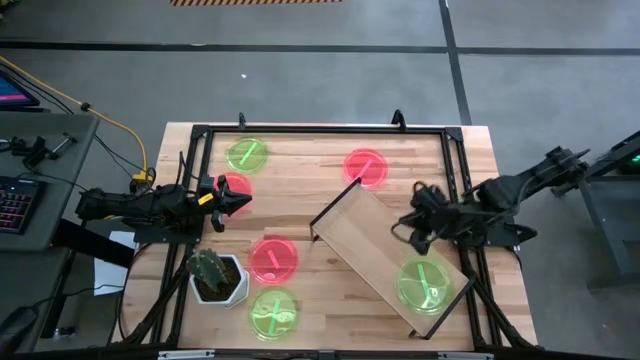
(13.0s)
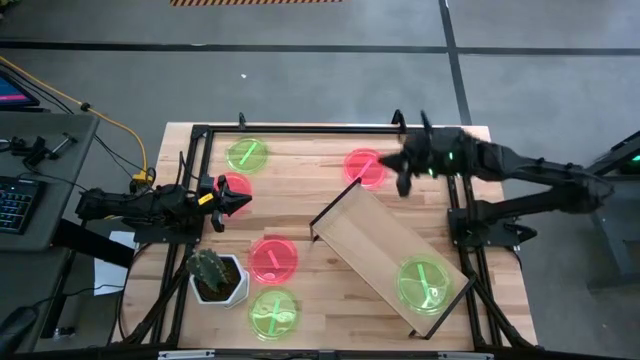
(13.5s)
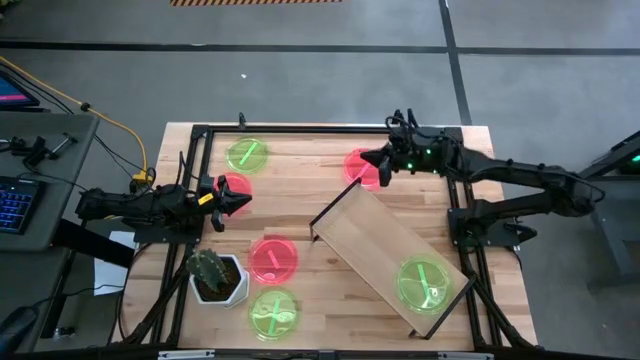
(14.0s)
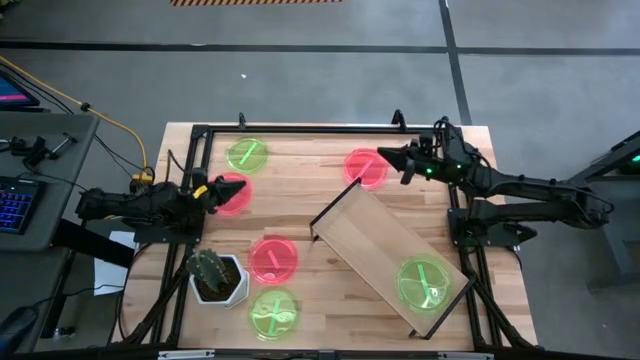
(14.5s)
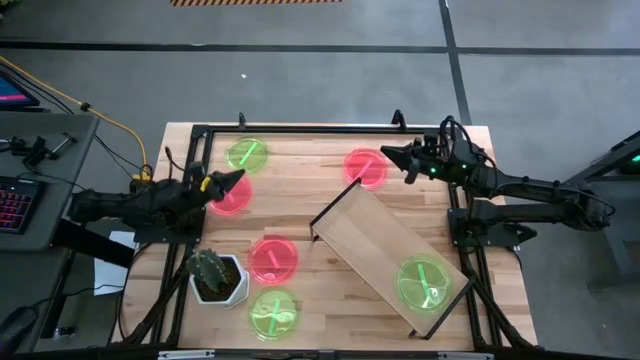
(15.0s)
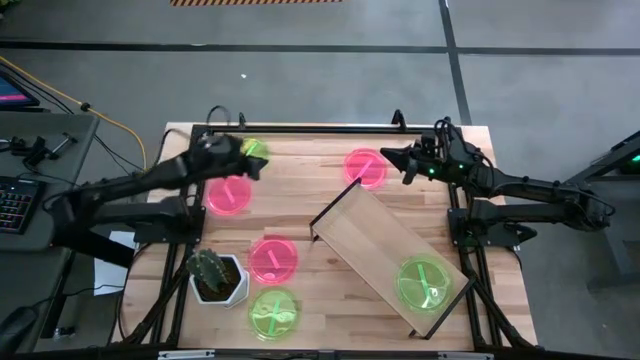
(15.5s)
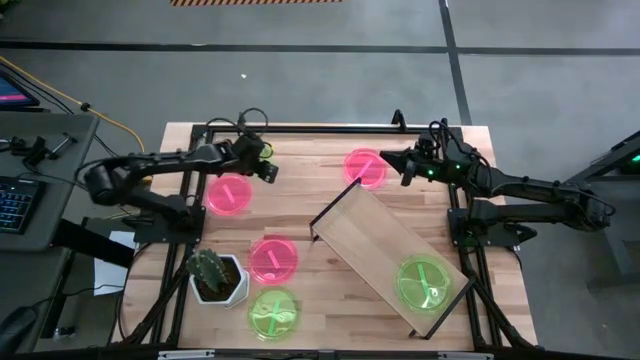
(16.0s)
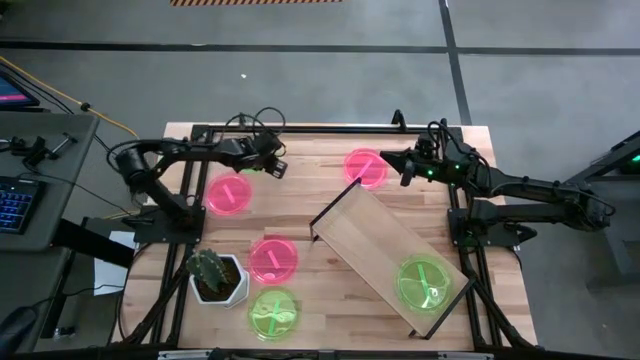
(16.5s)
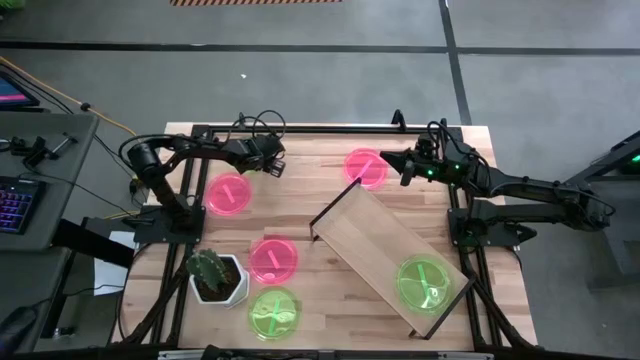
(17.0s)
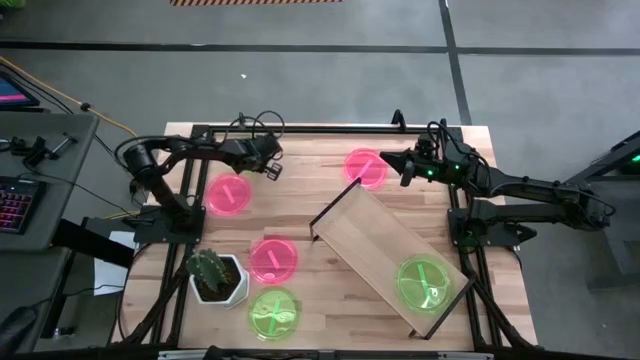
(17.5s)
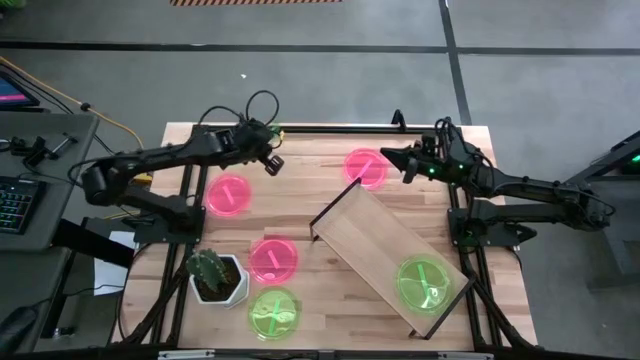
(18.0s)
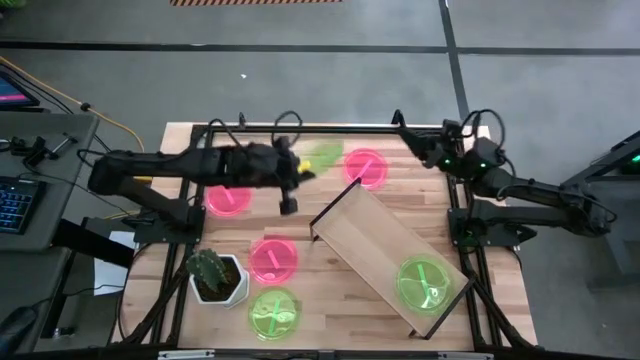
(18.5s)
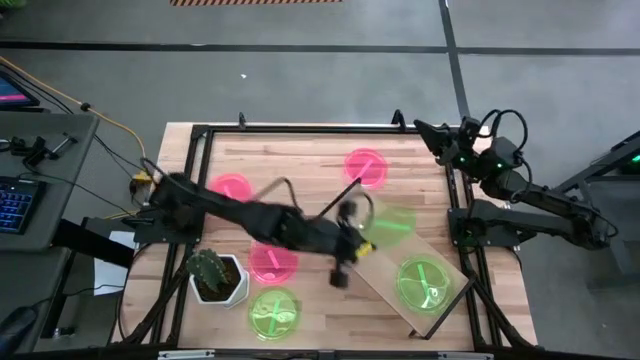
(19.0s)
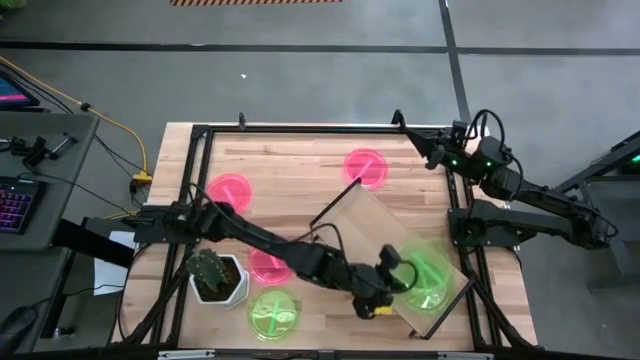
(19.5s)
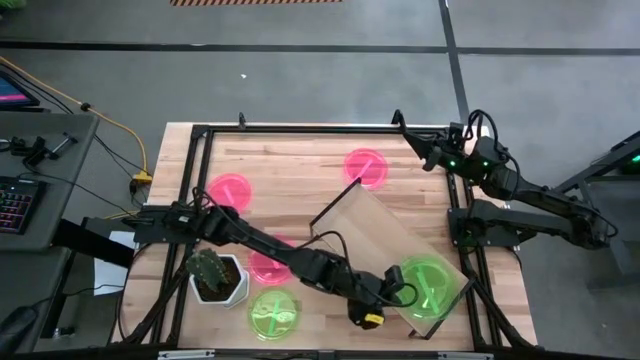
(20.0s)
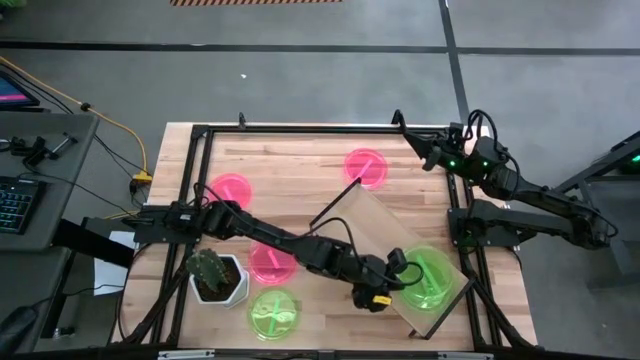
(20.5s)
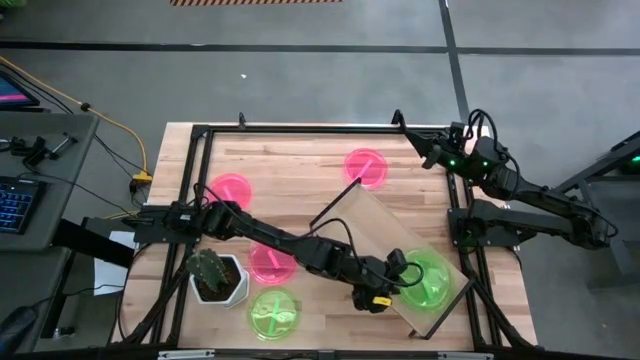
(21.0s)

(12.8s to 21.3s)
Task: Place and stack plates onto a shelf
Stack the top green plate on top of the green plate on the shelf

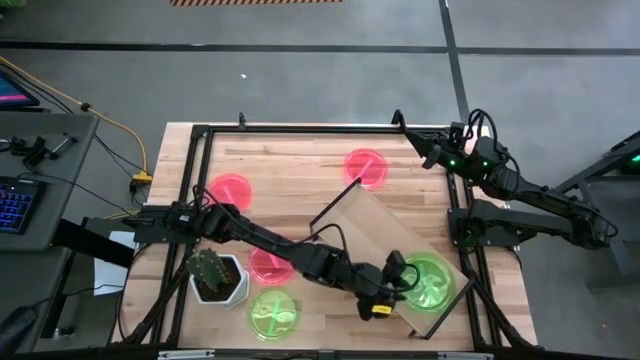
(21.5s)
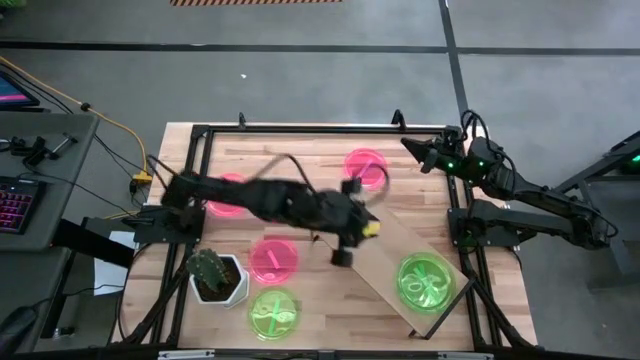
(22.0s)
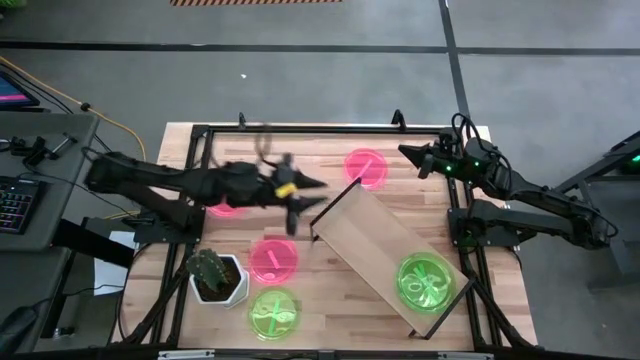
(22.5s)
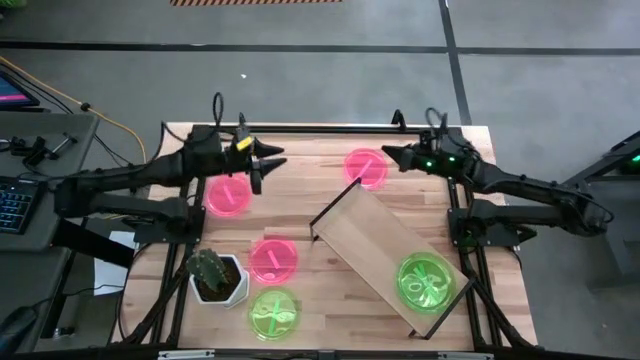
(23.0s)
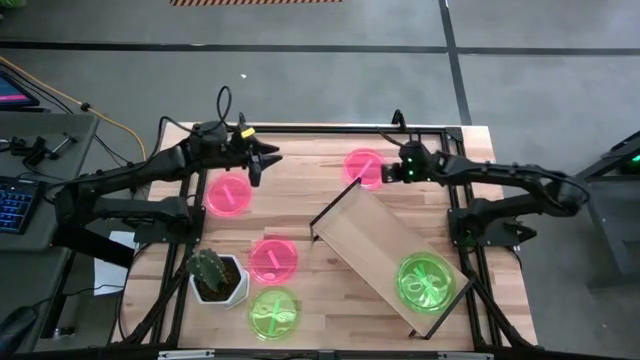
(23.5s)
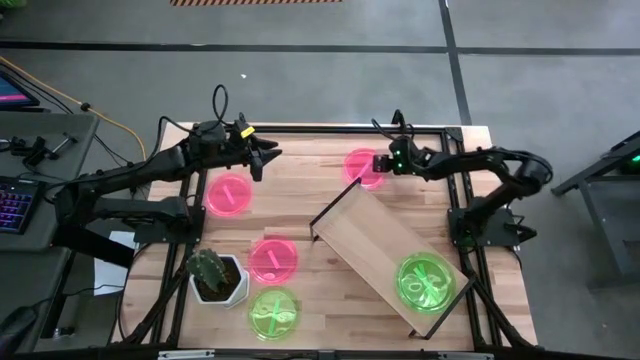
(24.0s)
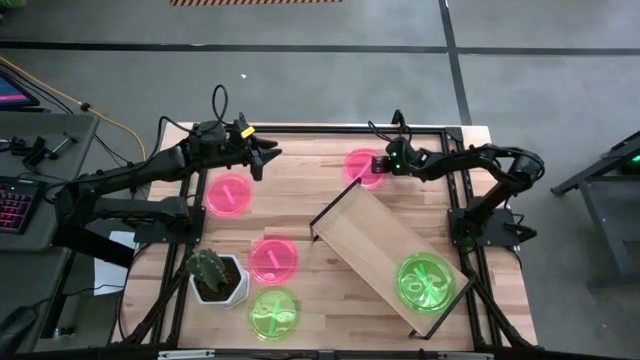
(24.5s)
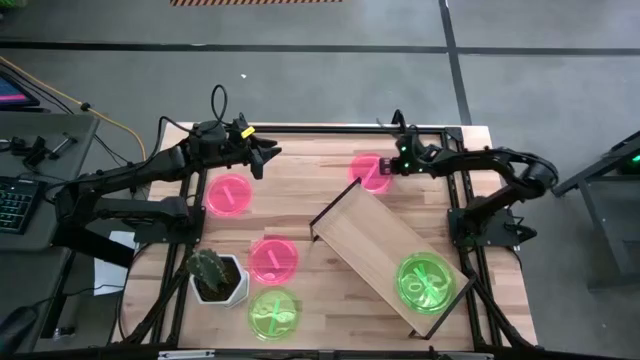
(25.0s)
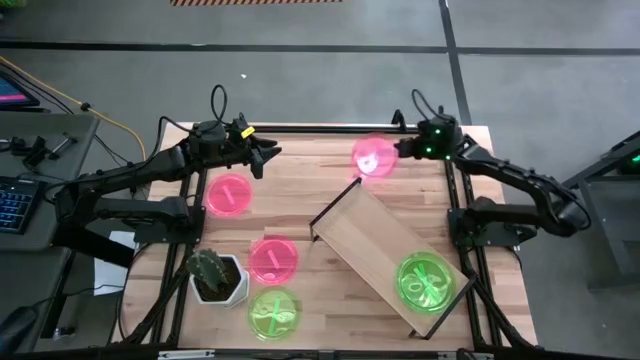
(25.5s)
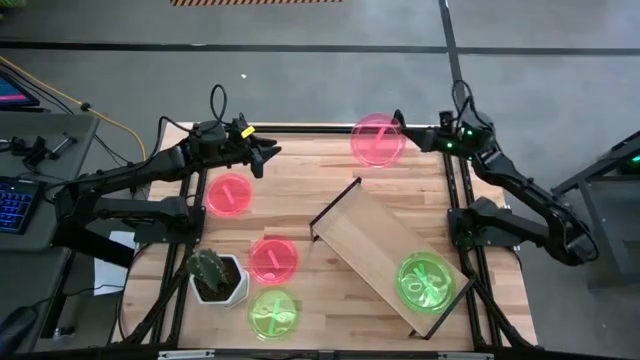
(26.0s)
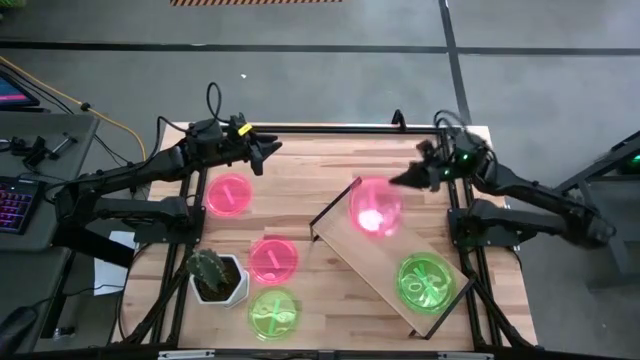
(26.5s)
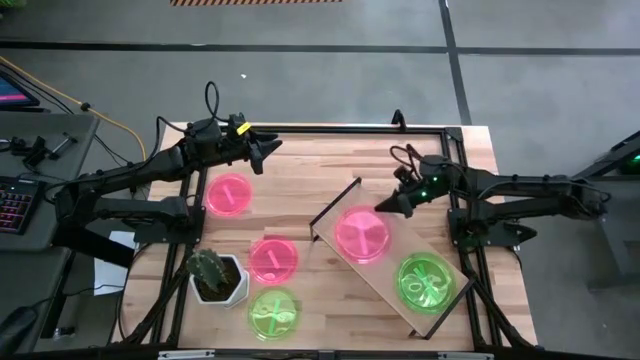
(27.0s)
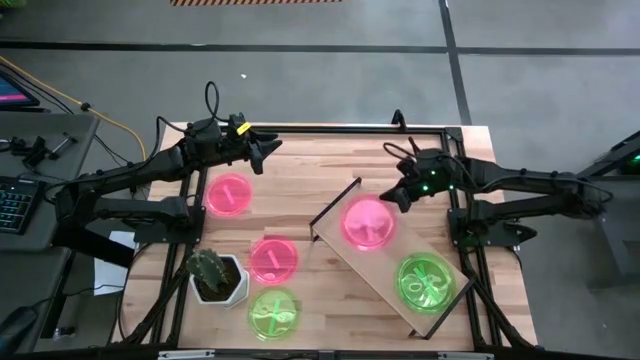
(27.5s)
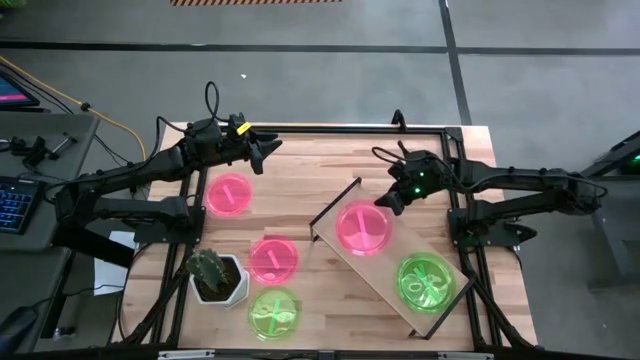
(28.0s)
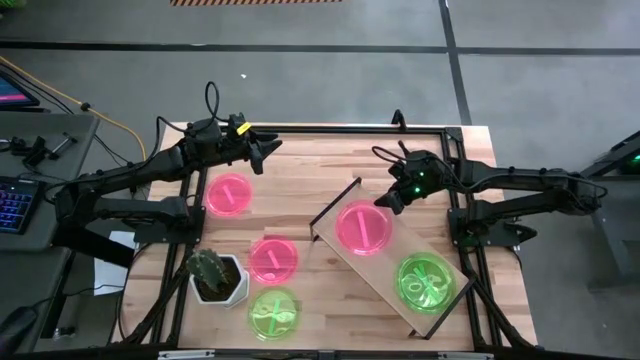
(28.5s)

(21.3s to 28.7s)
Put the top right pink plate on the shelf

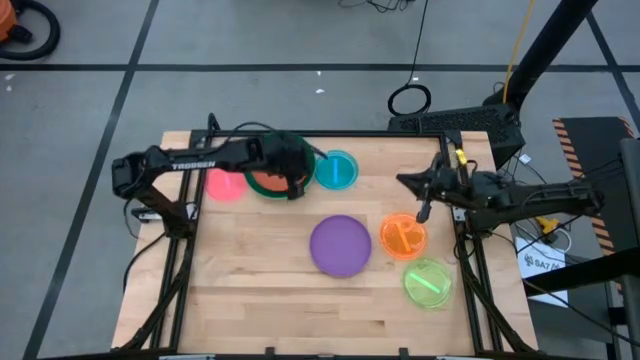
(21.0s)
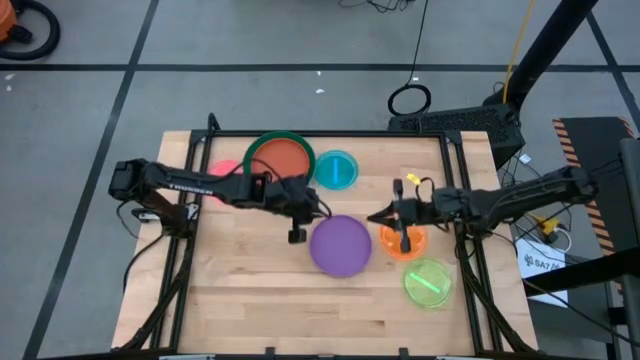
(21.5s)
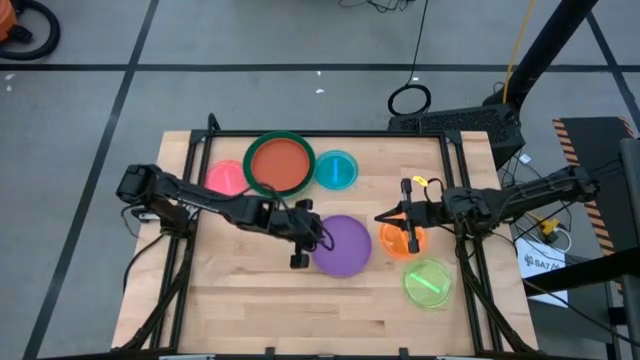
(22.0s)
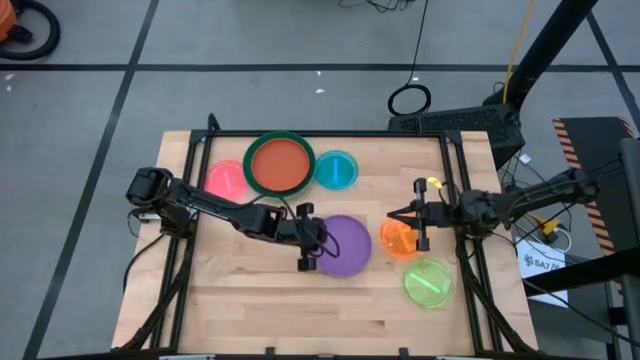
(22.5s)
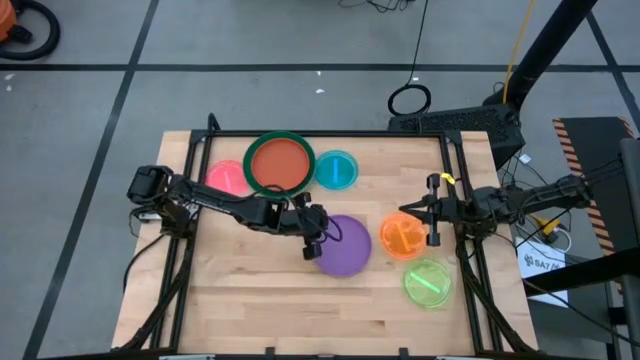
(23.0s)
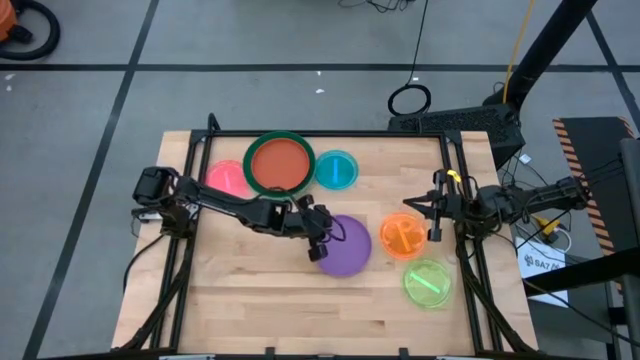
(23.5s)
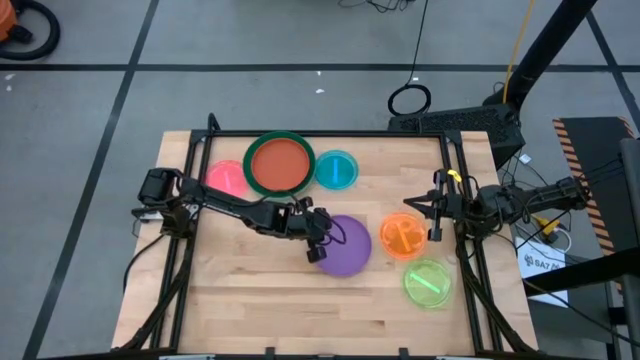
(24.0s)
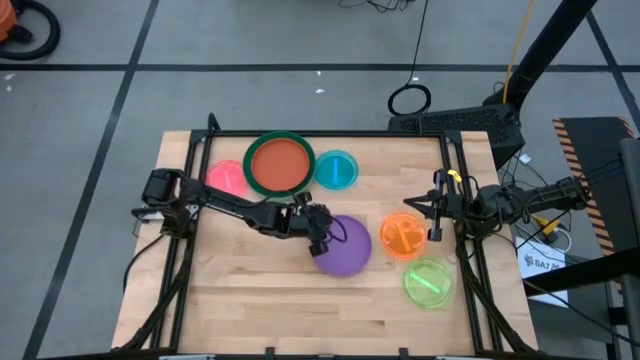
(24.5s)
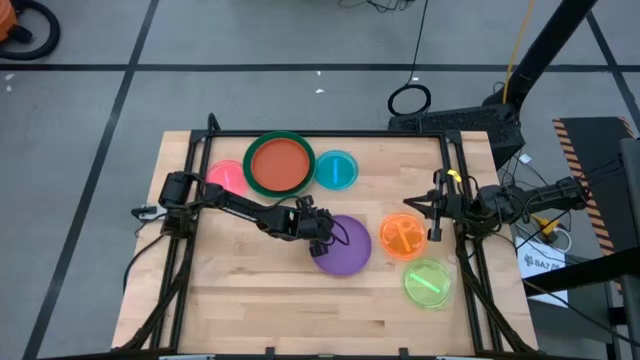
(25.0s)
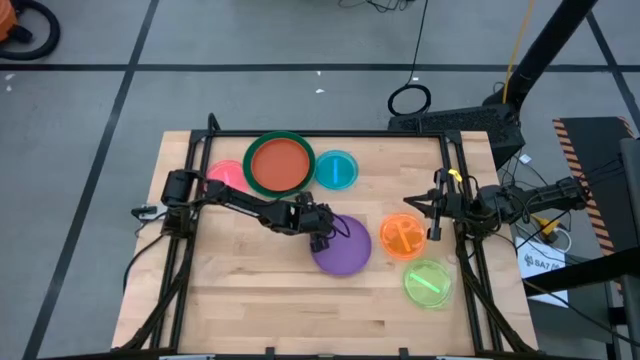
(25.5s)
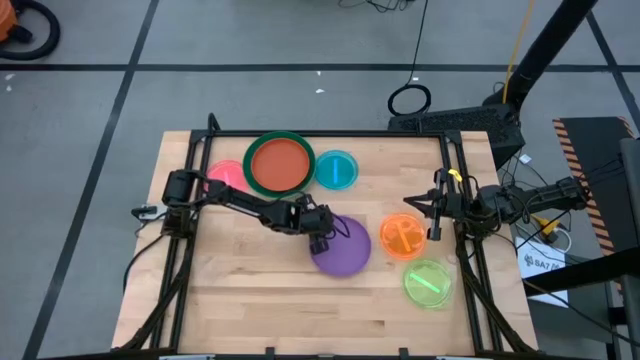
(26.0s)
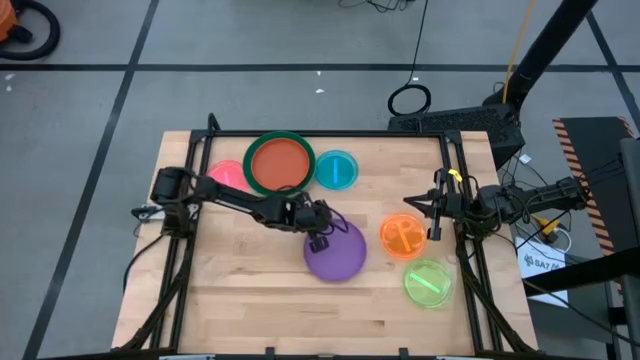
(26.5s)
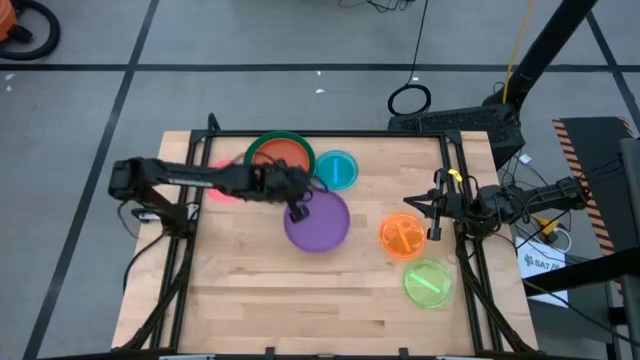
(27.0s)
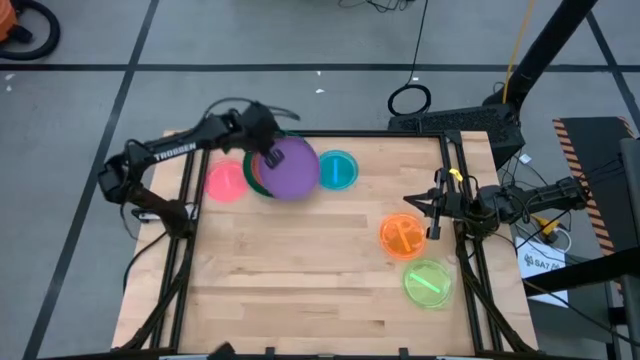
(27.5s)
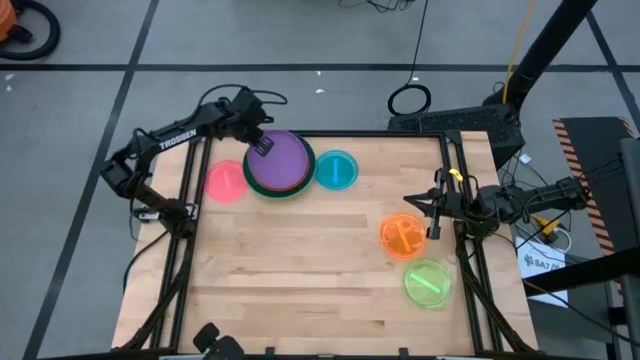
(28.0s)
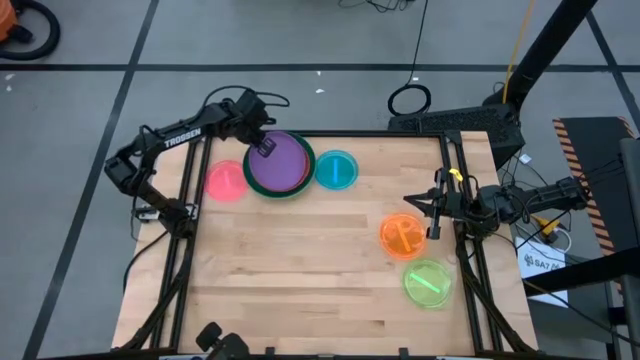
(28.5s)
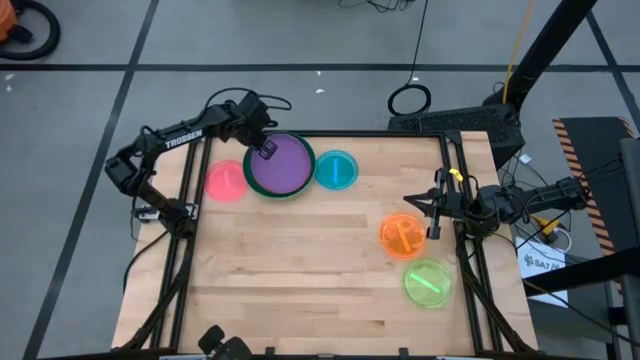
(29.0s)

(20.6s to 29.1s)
Task: Stack plastic plates
Stack the purple plate on top of the dark orange plate
